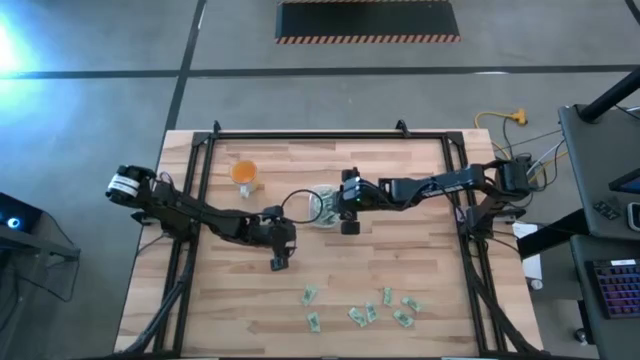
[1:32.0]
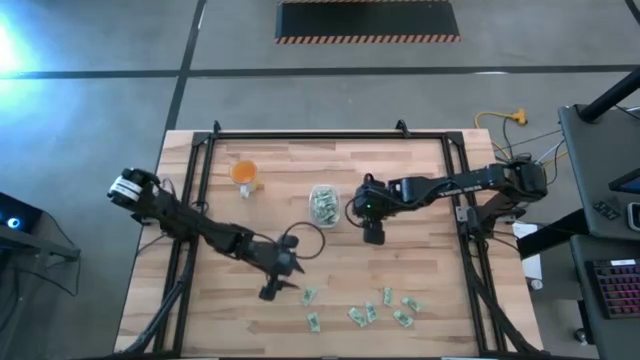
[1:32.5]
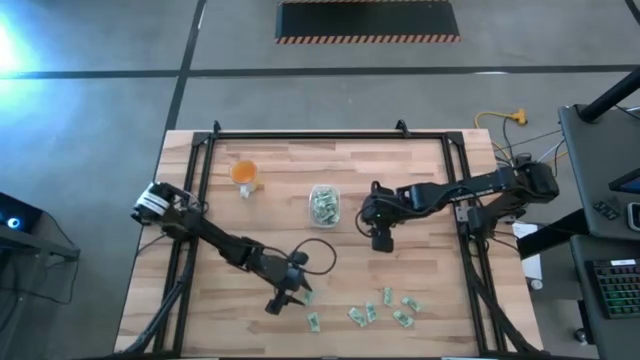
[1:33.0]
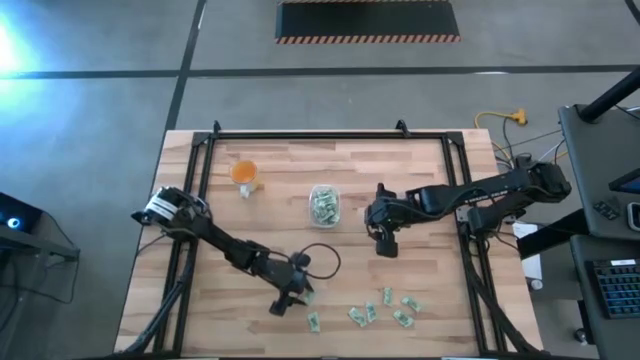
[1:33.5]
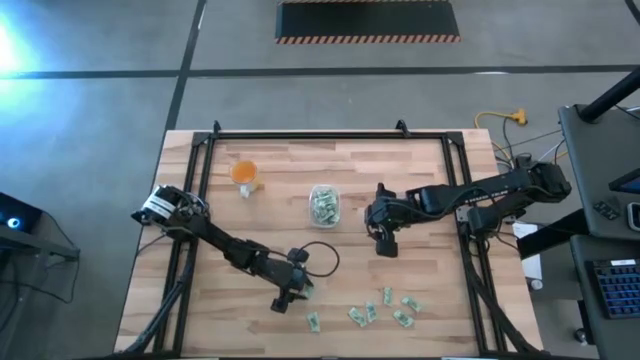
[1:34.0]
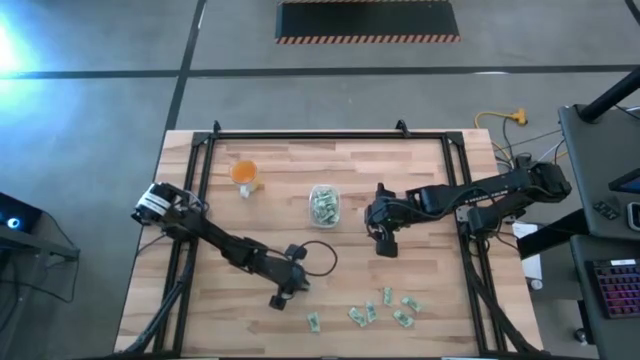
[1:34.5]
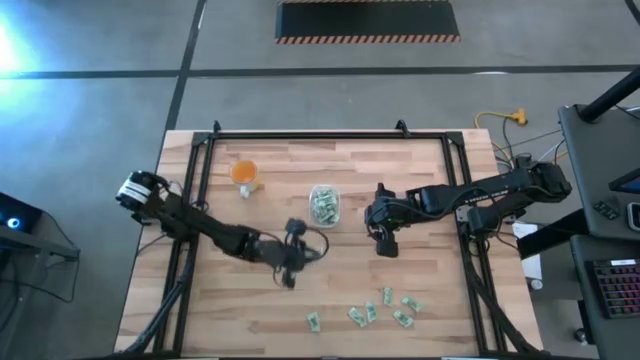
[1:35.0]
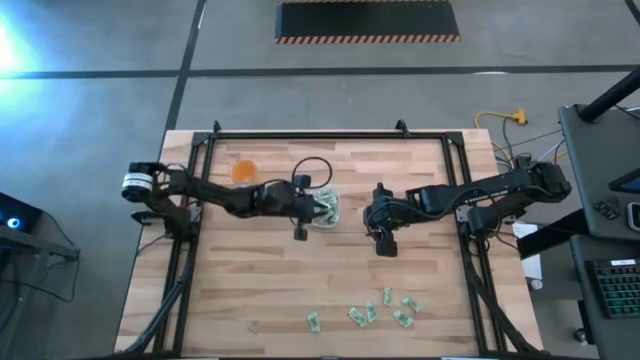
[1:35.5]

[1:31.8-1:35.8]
Task: Pick and place Stevia / Truvia into bins
Put the stevia packet into the bin

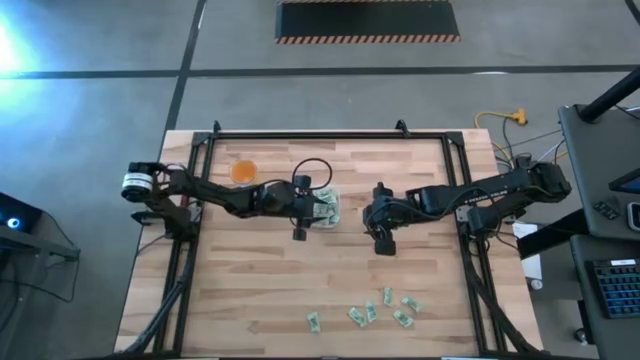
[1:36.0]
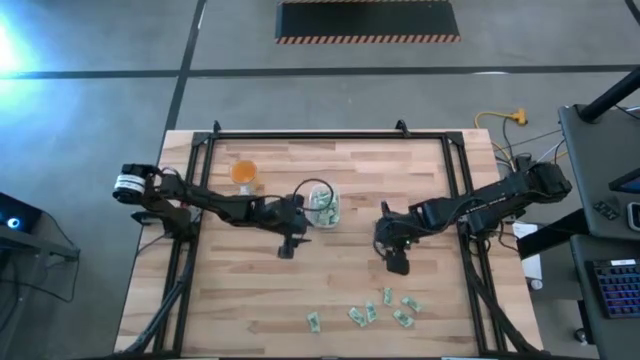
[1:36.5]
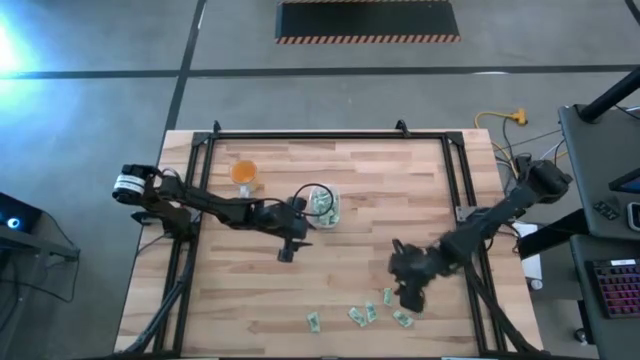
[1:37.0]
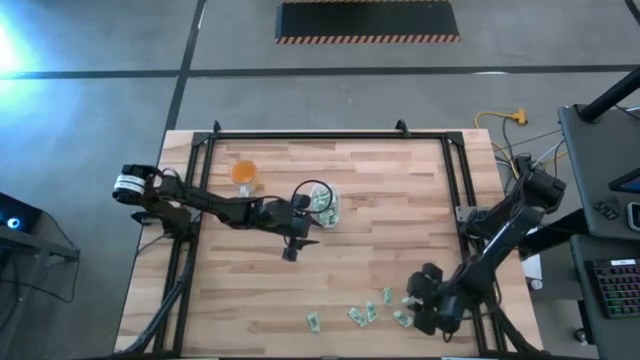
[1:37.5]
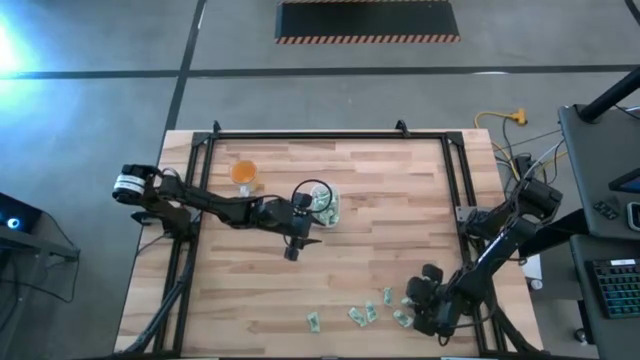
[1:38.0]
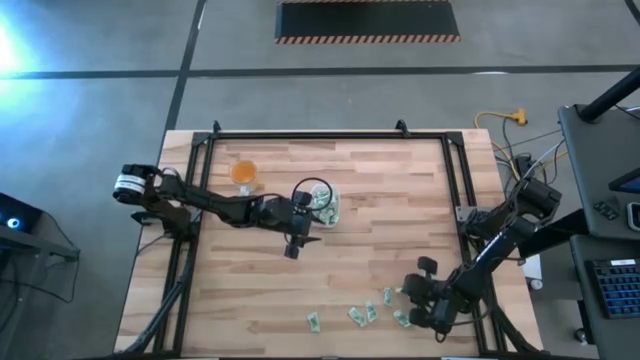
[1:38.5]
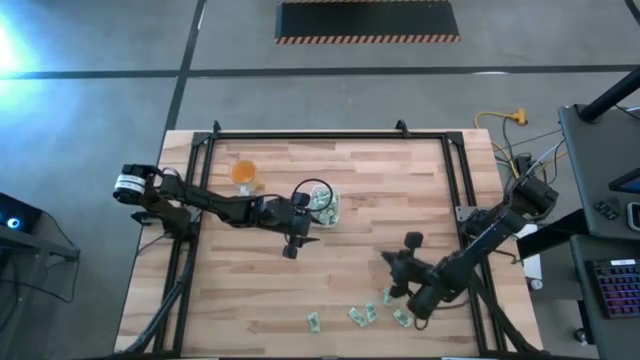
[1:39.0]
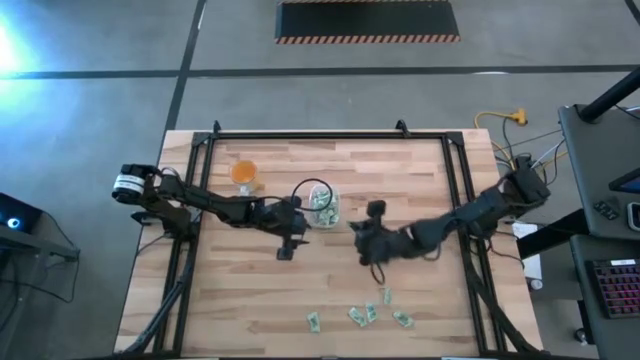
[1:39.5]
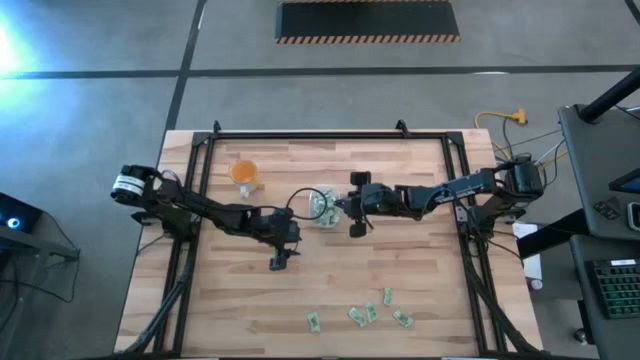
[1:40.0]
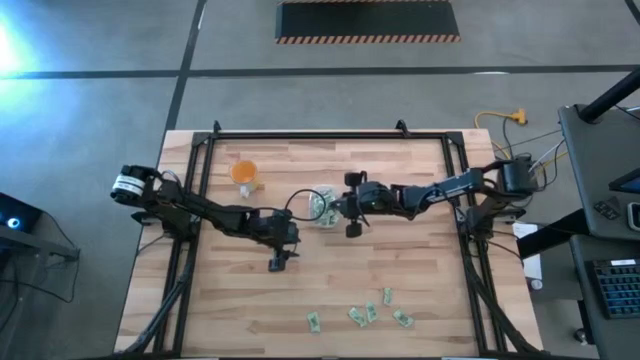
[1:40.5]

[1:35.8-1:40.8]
Put the stevia packet into the bin

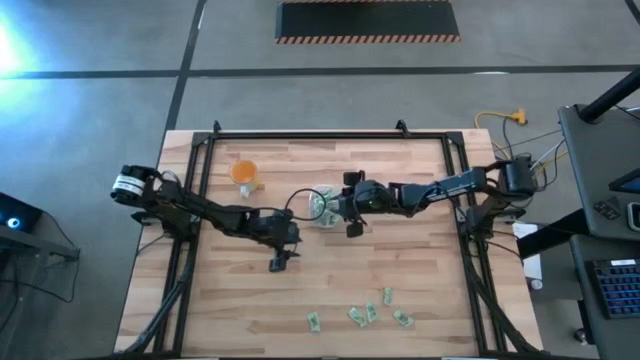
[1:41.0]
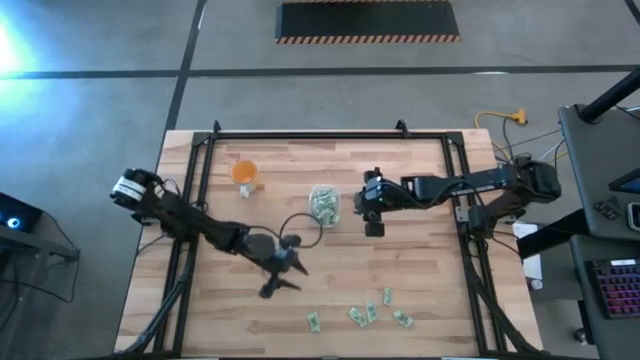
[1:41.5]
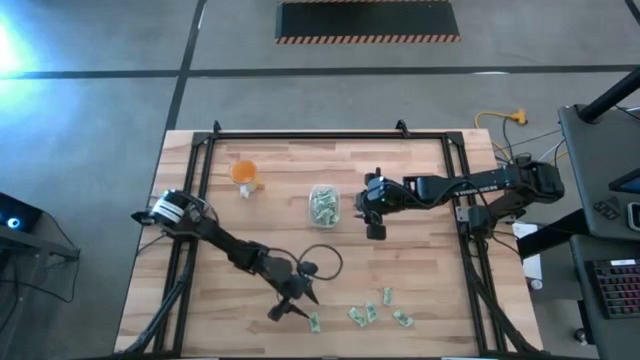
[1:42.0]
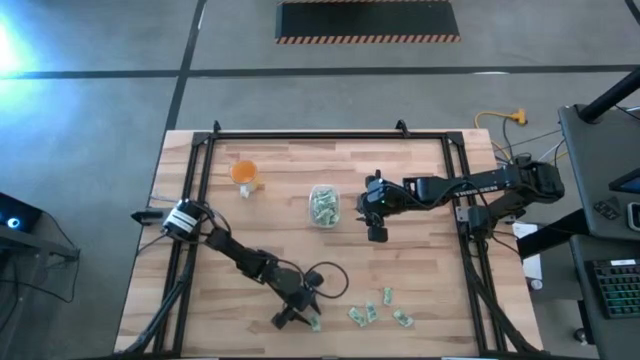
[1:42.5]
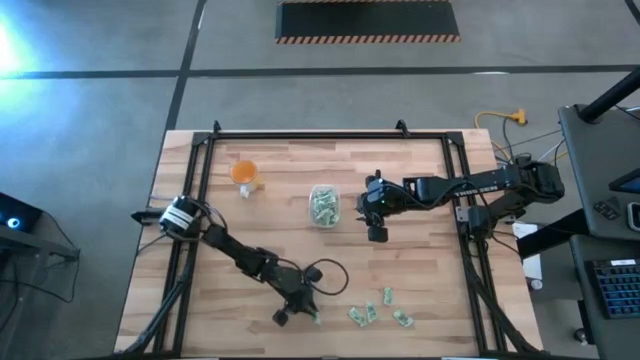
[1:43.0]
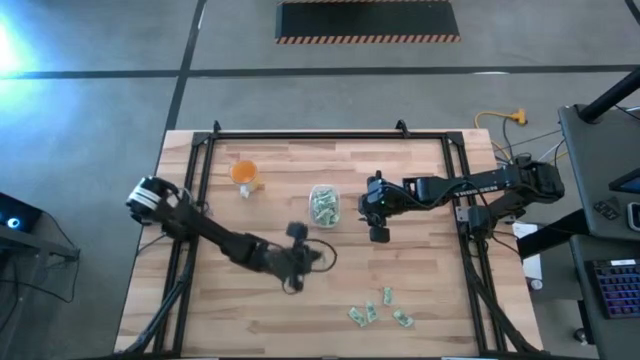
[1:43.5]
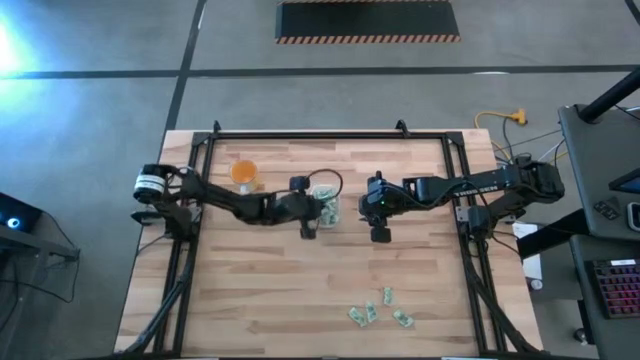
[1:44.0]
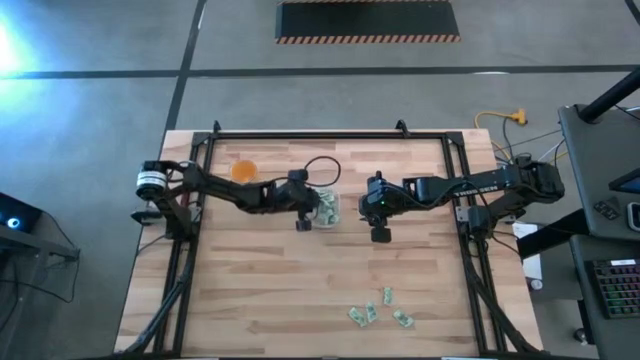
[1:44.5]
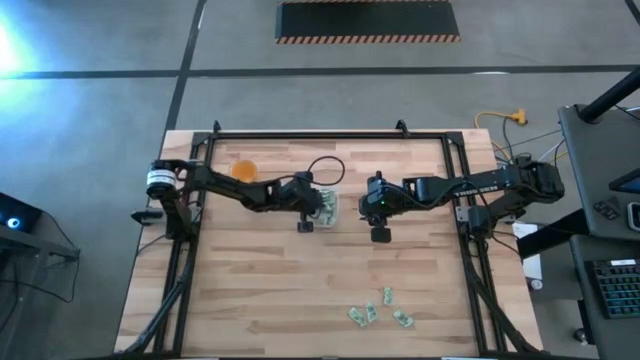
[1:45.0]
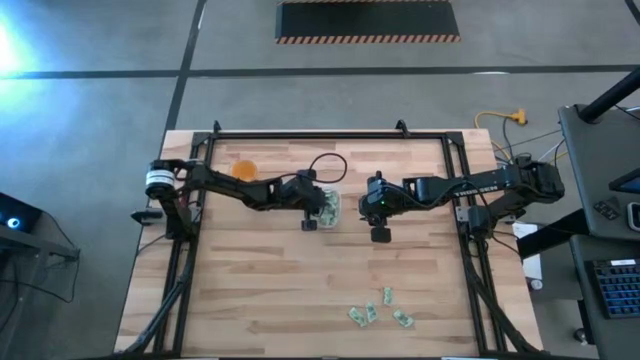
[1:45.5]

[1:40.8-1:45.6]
Put the stevia packet into the bin

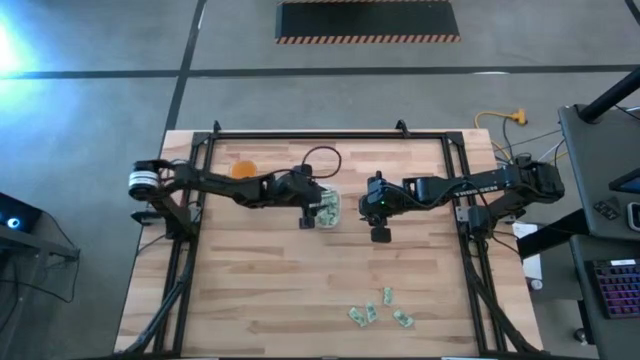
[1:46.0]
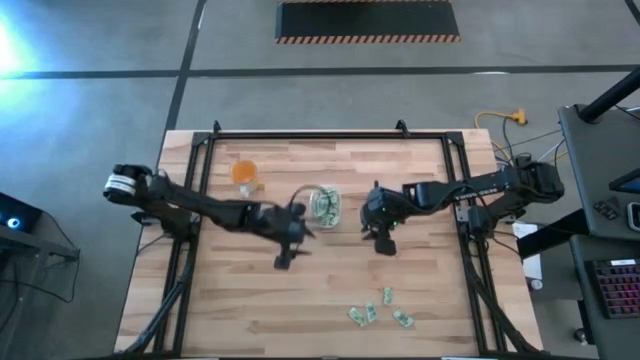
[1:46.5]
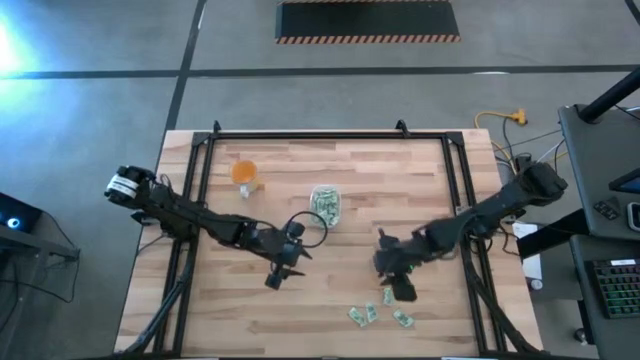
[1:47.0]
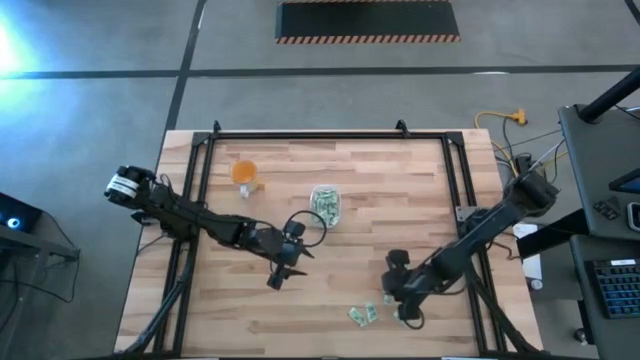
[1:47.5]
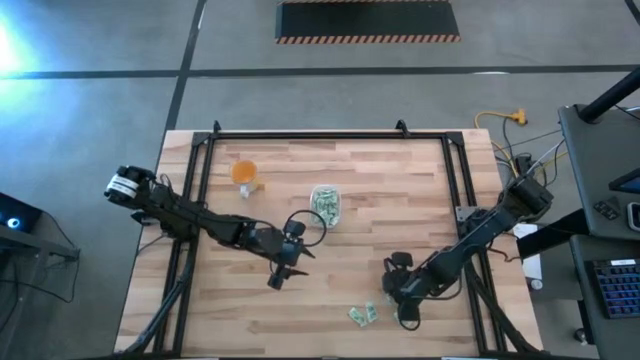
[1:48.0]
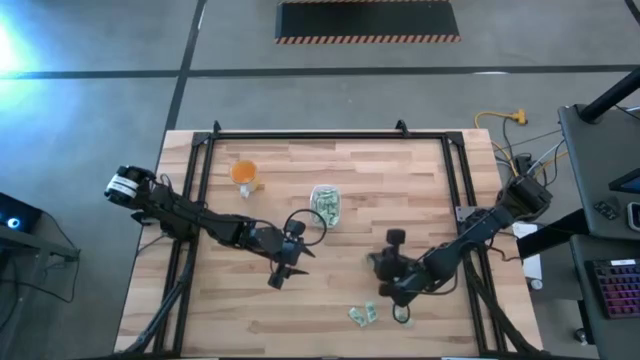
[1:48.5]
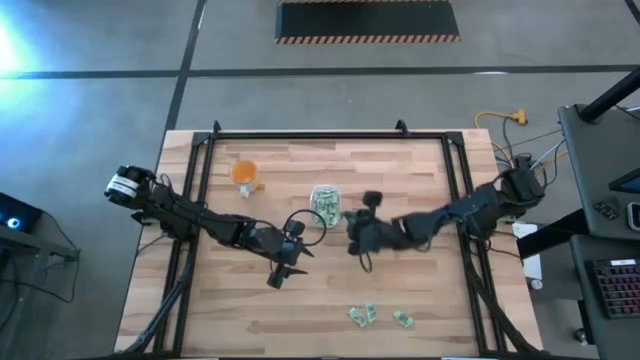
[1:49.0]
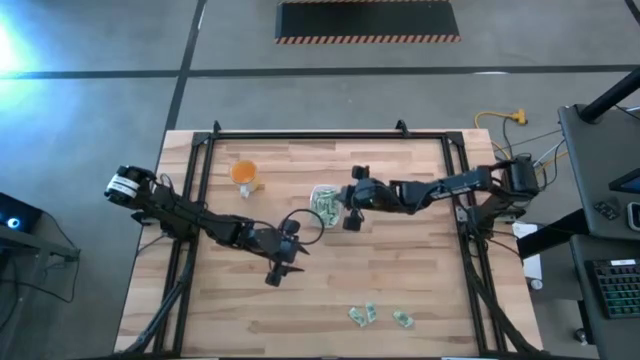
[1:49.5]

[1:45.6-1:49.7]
Put the stevia packet into the bin

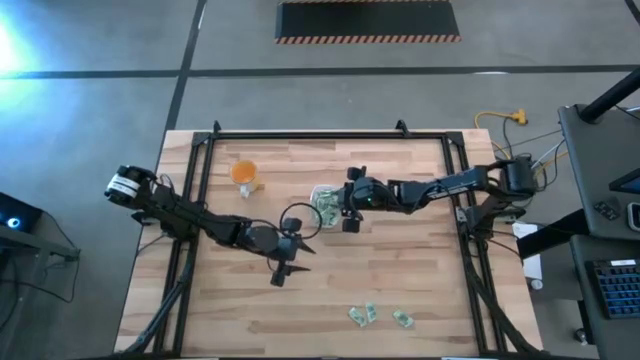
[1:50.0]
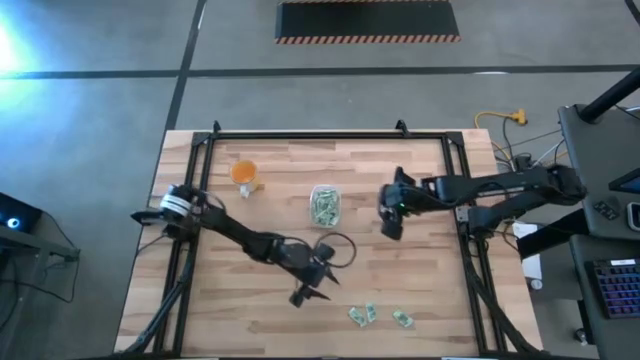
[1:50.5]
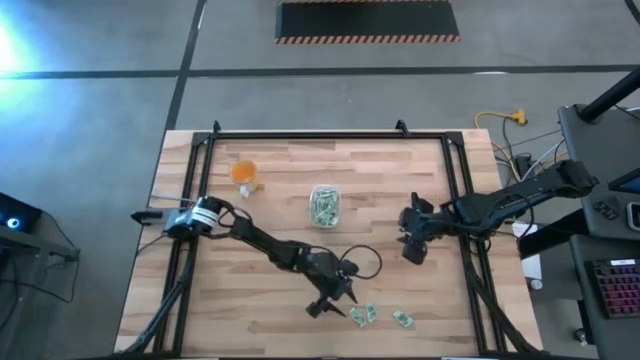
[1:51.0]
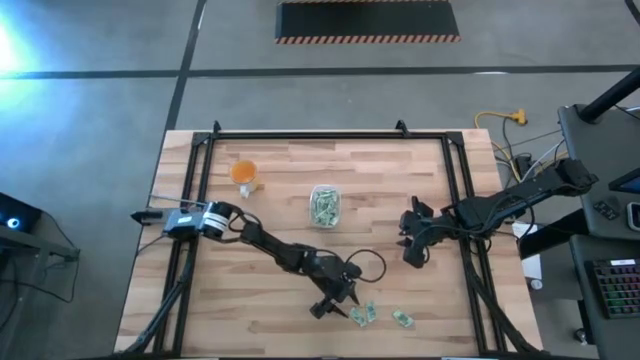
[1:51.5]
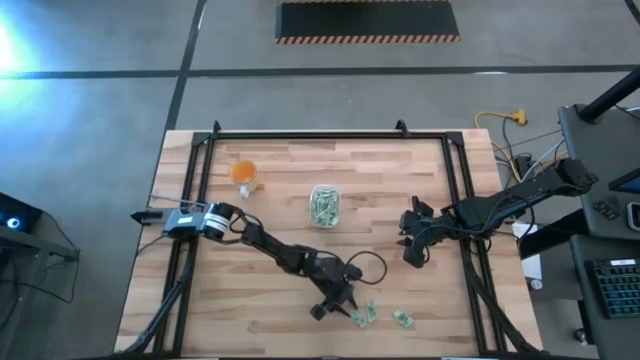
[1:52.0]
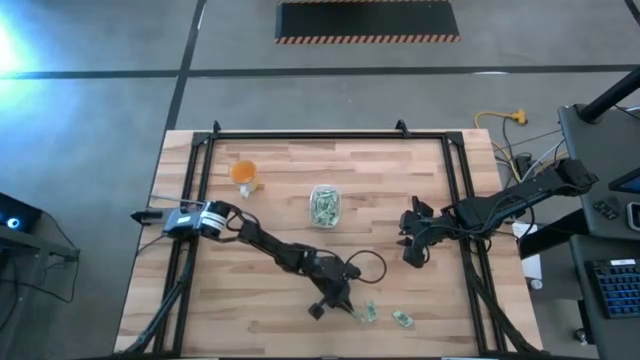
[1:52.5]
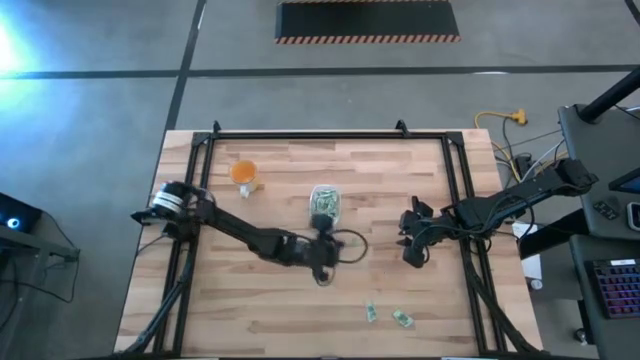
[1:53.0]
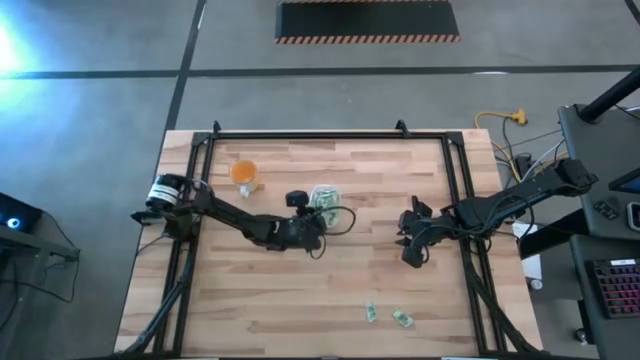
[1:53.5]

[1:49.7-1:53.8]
Put the left stevia packet into the bin
